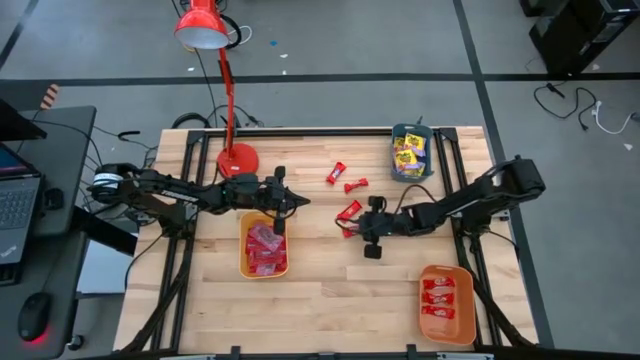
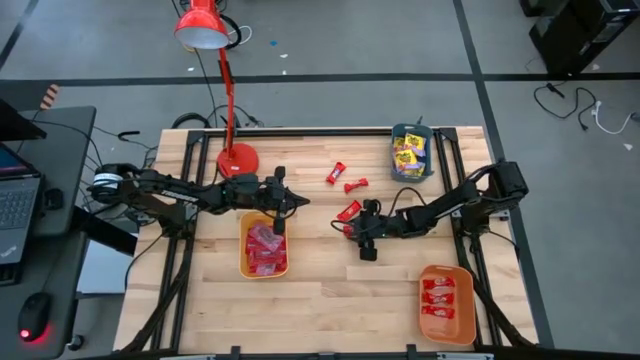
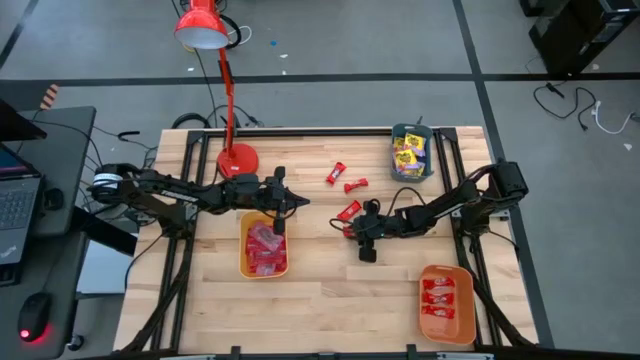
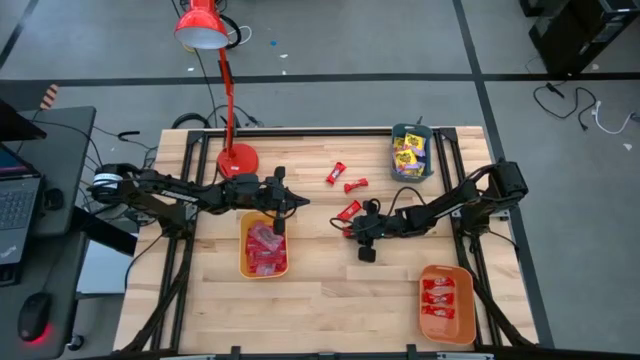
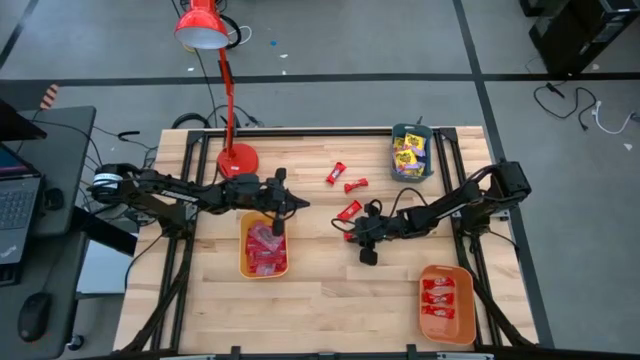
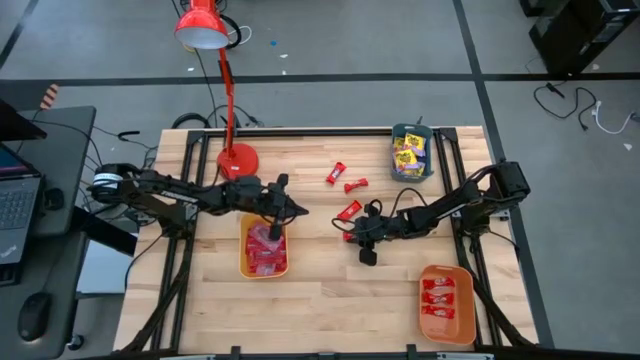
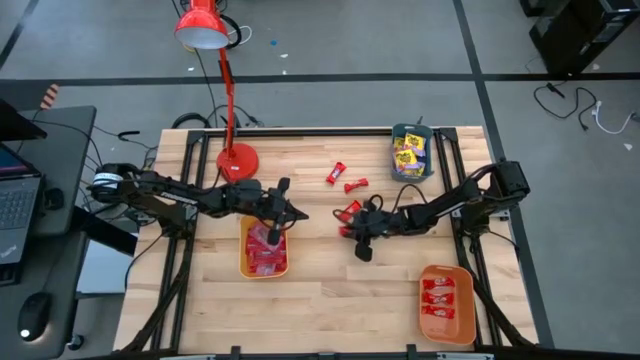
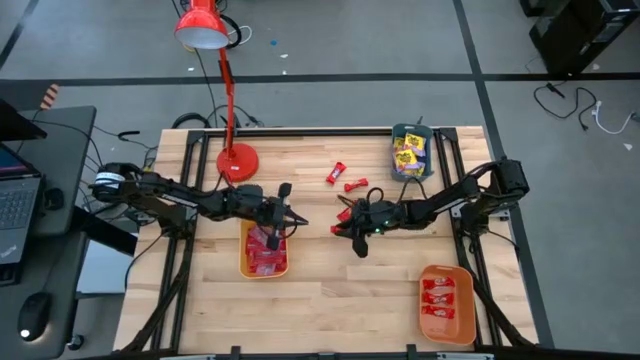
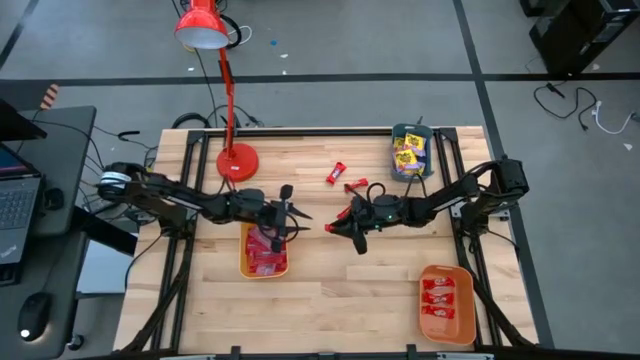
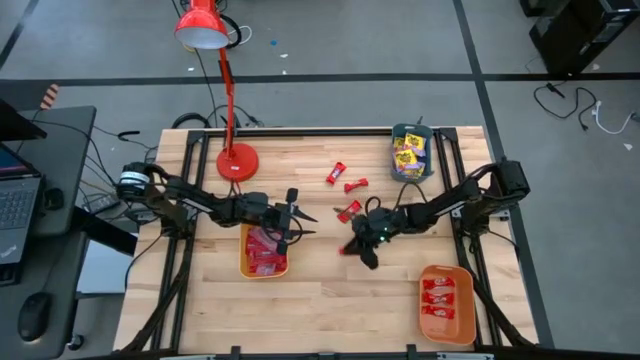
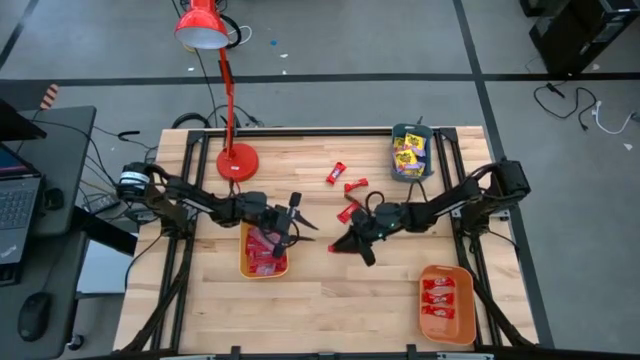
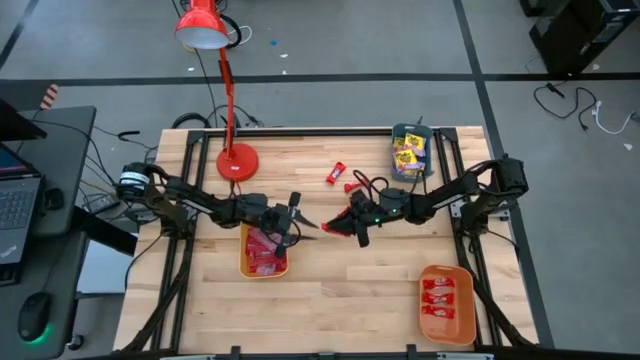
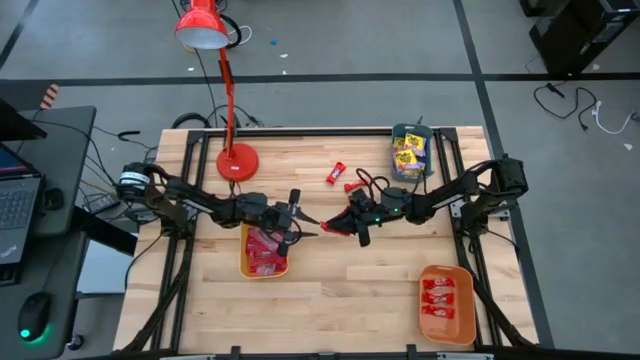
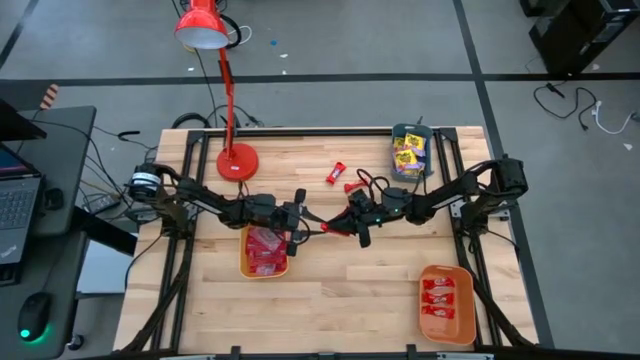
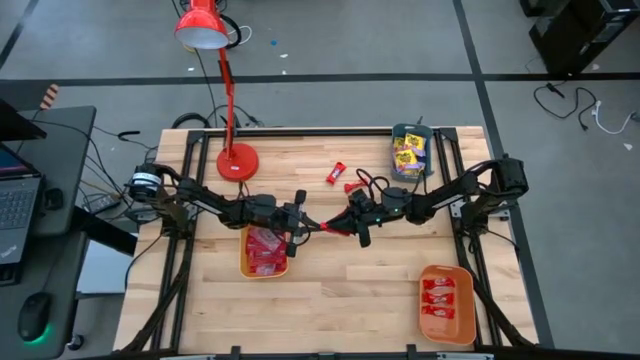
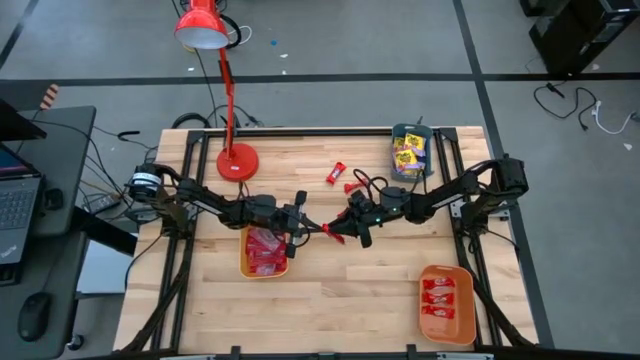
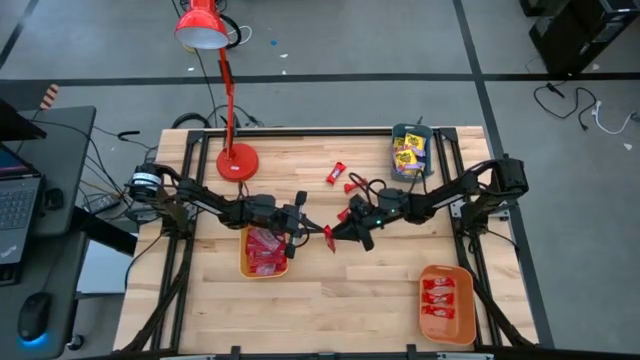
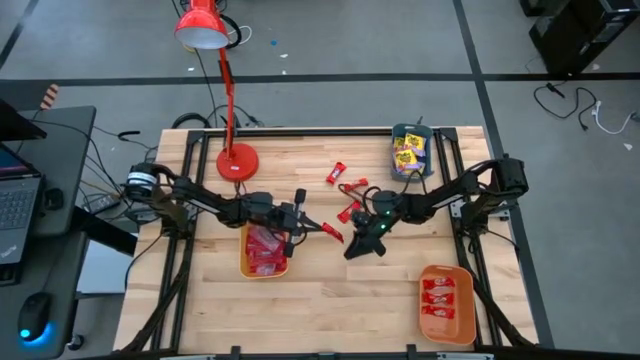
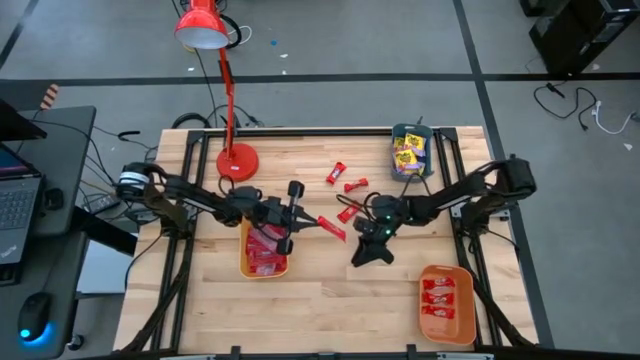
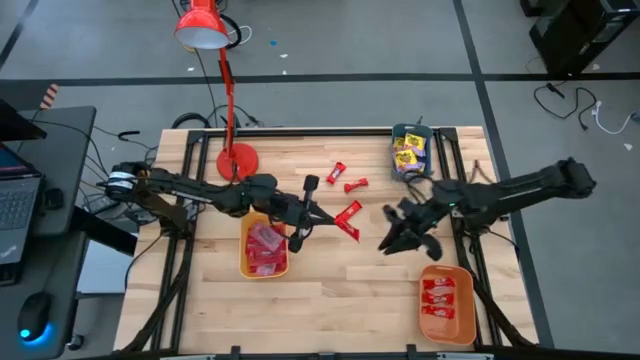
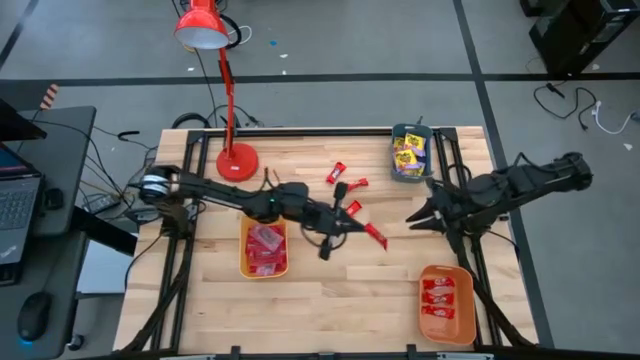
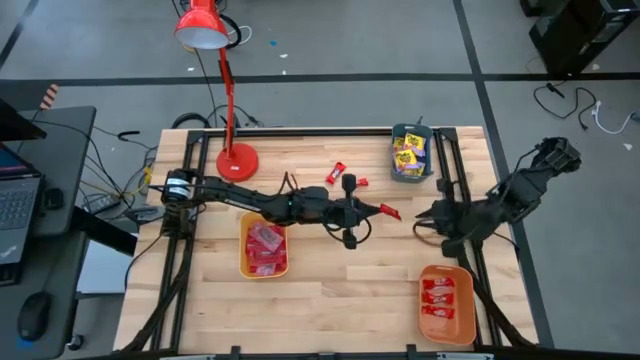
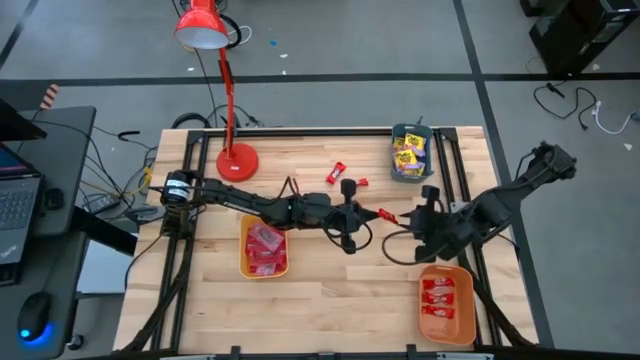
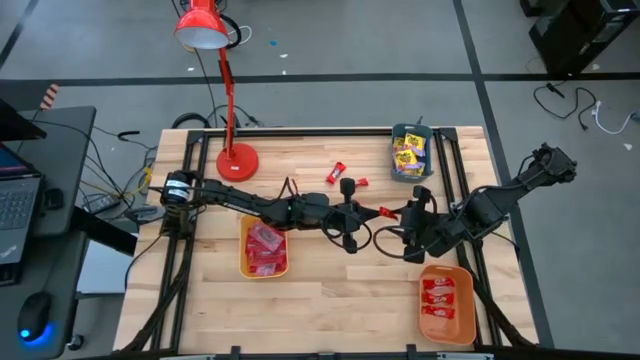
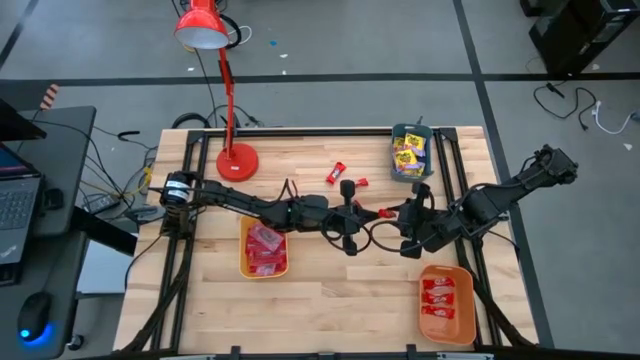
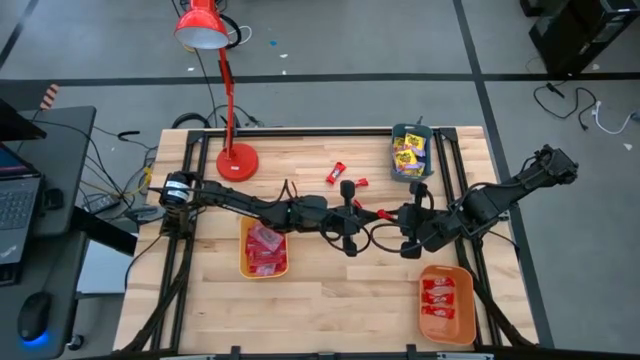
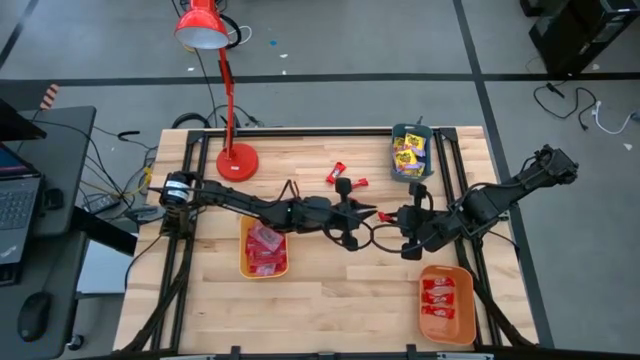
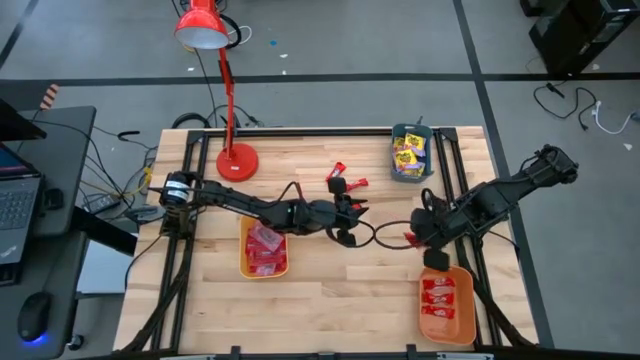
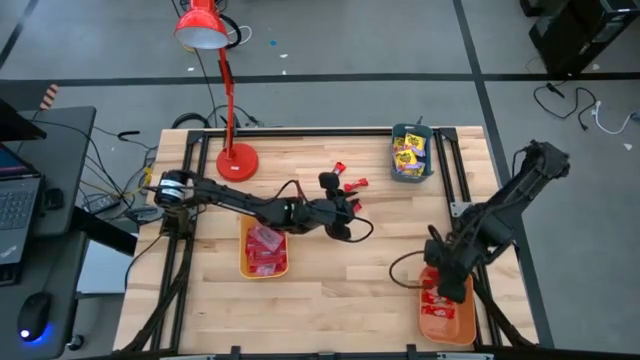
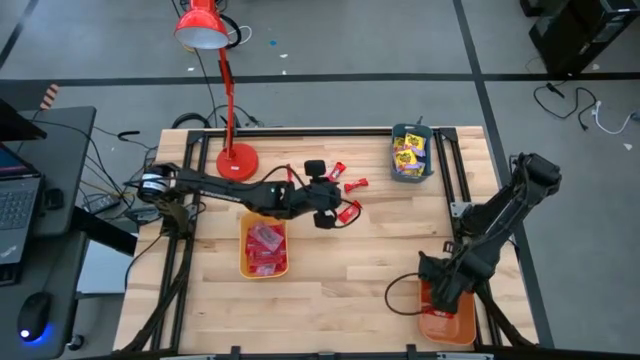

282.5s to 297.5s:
Task: Sort candy
Put the red chocolate into the orange bin

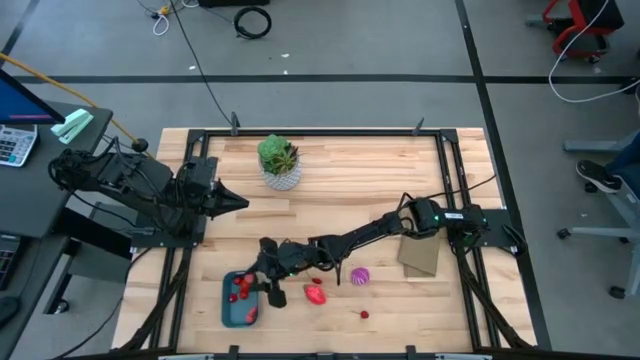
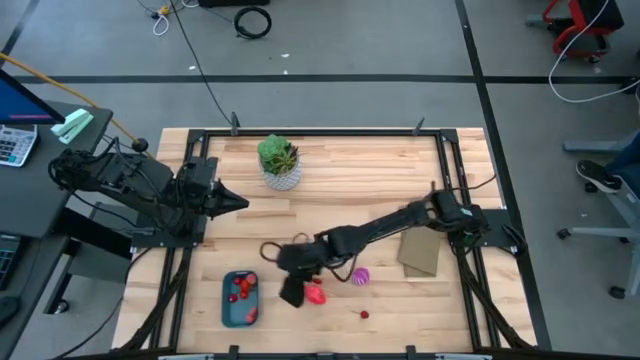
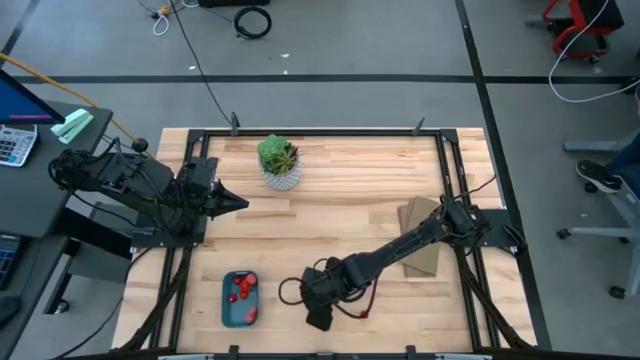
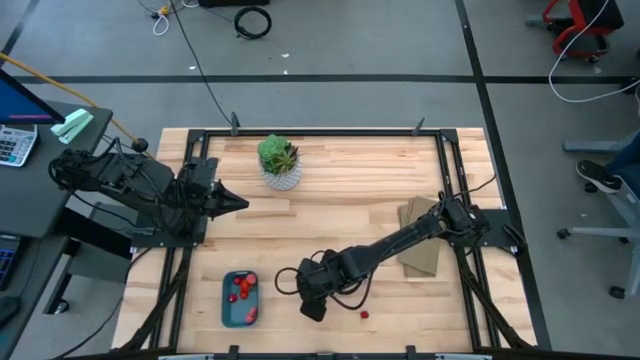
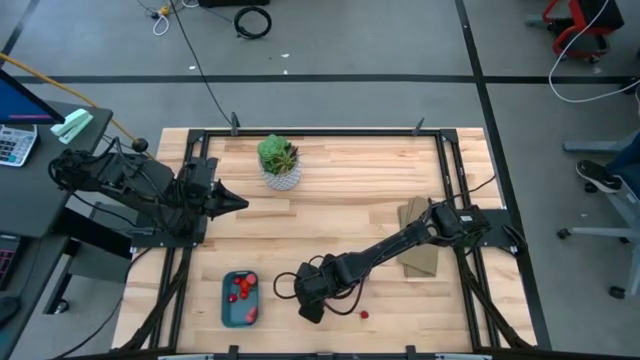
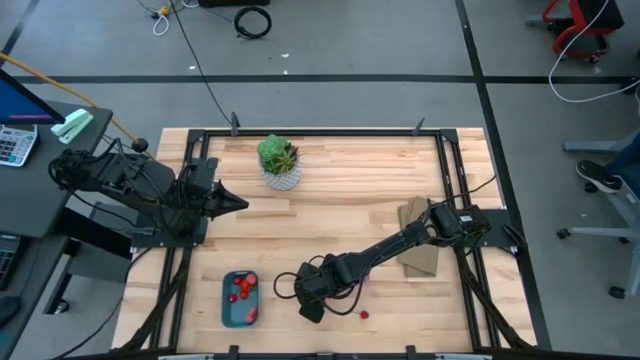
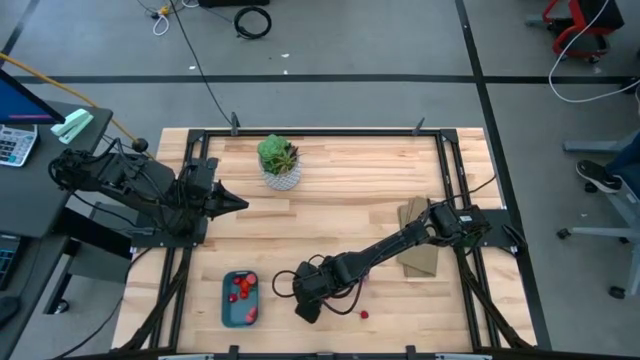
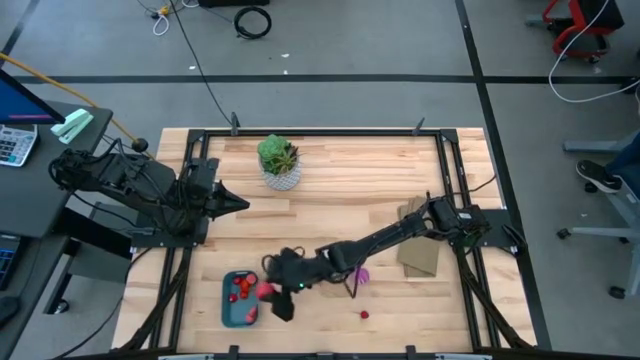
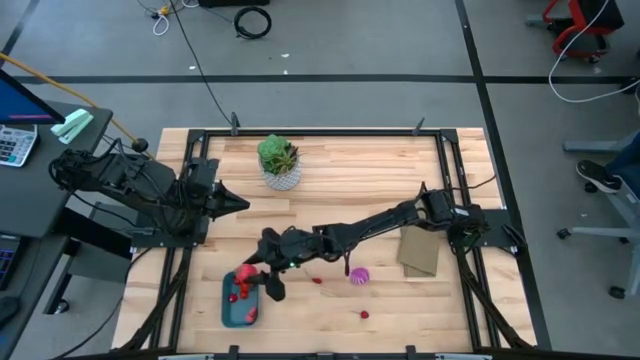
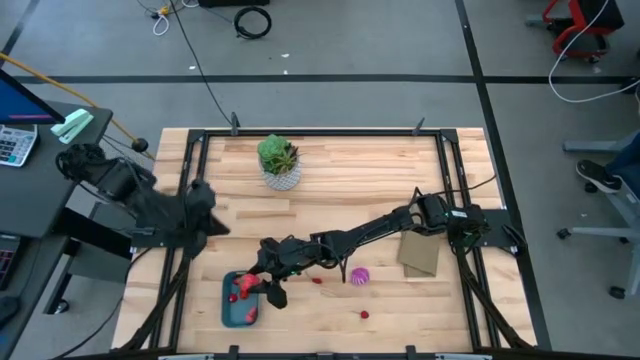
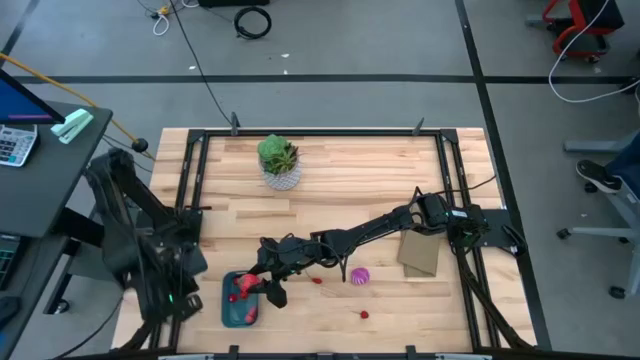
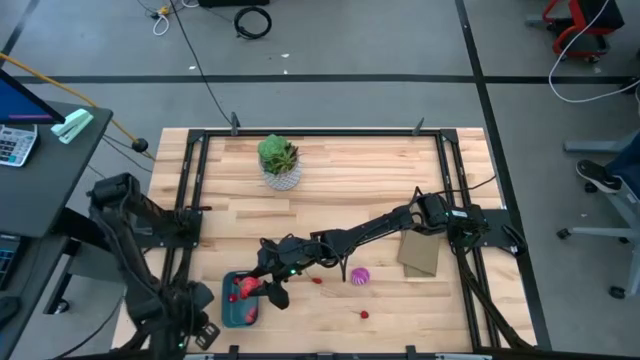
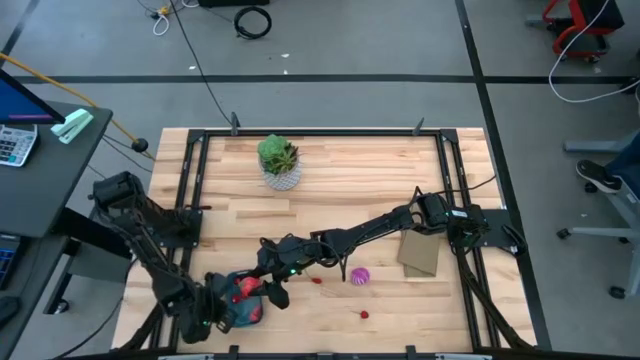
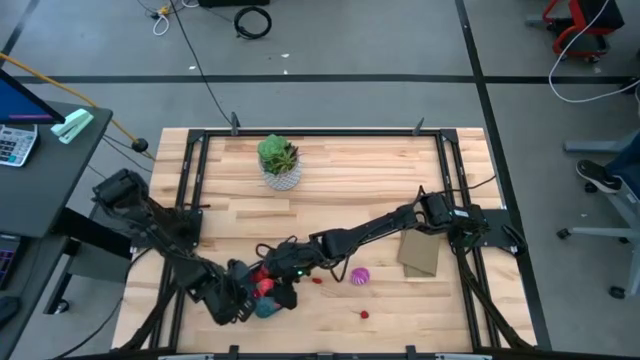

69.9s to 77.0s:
Task: Pick and placing Produce into tupperware
Put the dragonfruit into the bin
